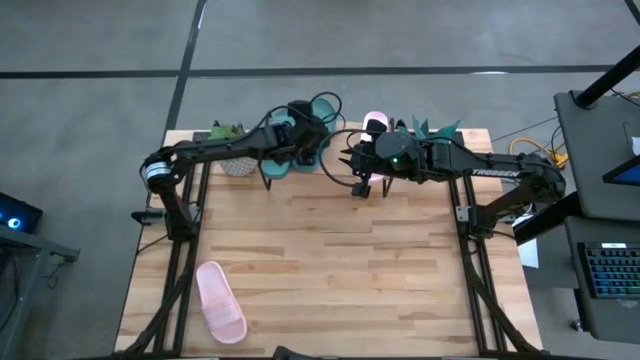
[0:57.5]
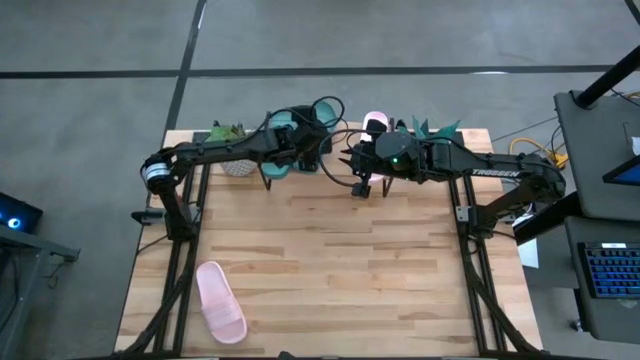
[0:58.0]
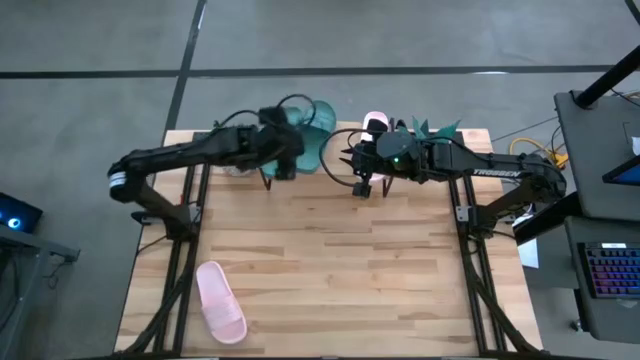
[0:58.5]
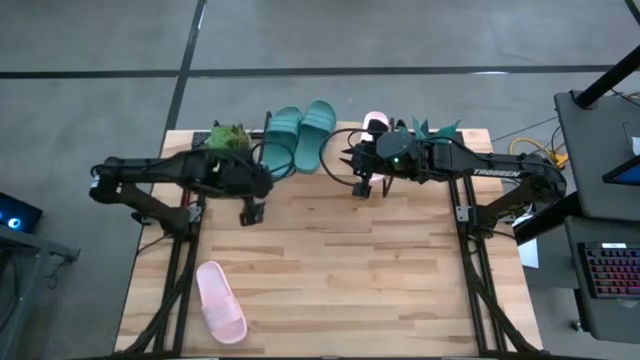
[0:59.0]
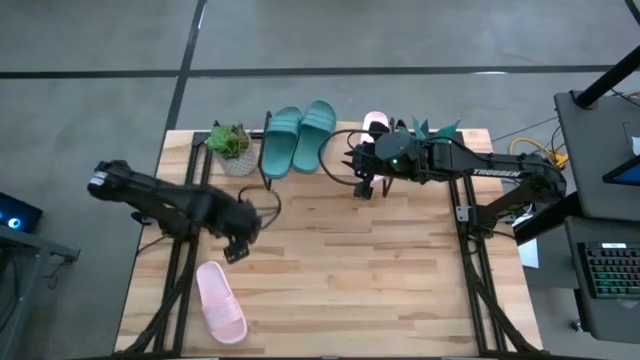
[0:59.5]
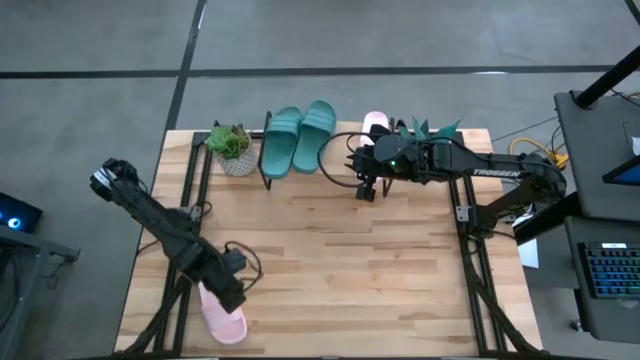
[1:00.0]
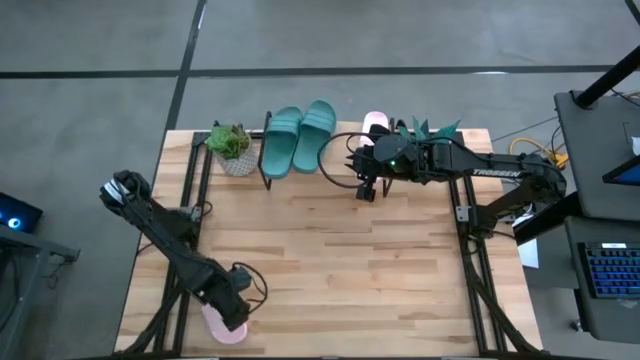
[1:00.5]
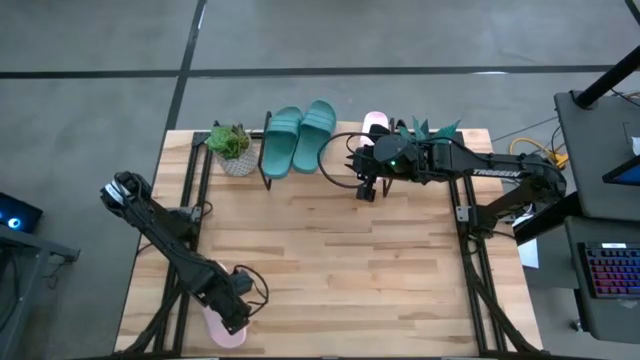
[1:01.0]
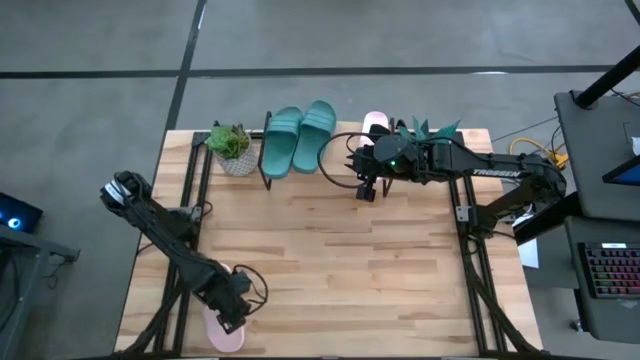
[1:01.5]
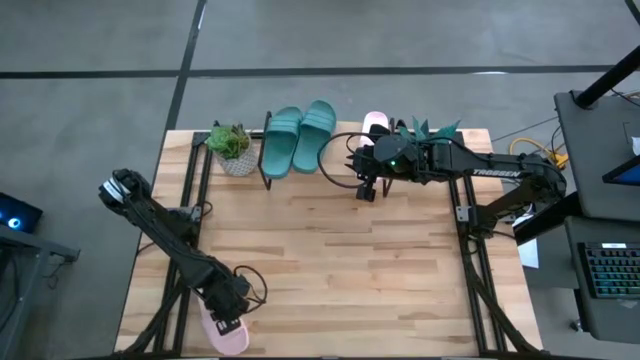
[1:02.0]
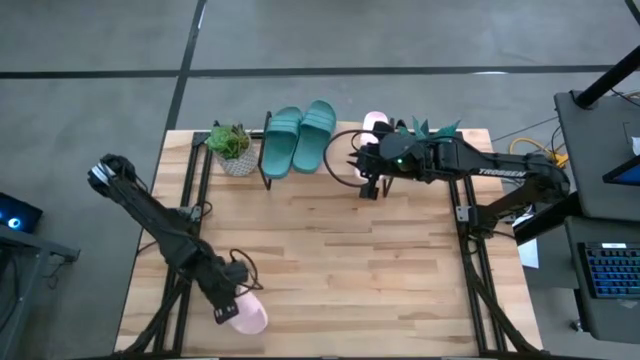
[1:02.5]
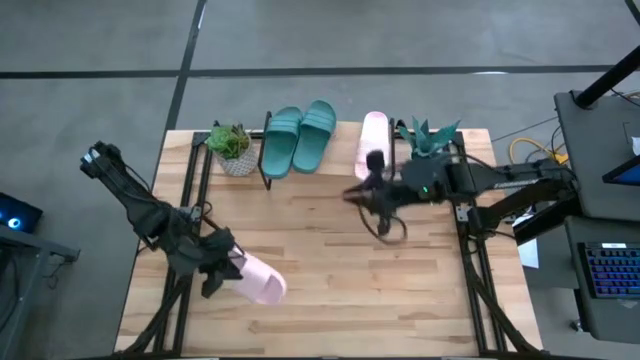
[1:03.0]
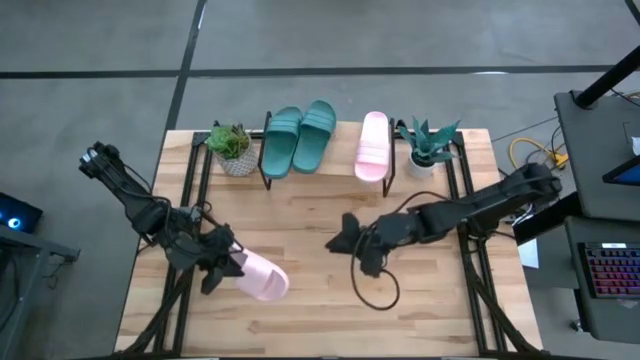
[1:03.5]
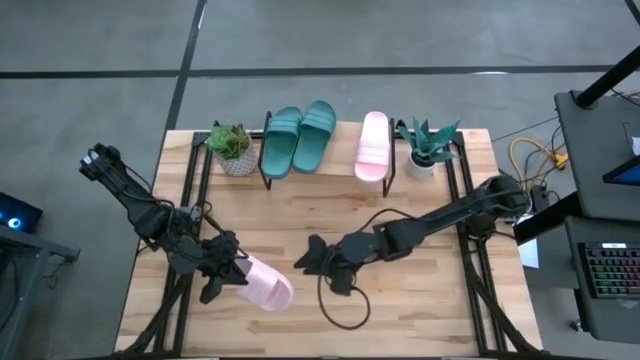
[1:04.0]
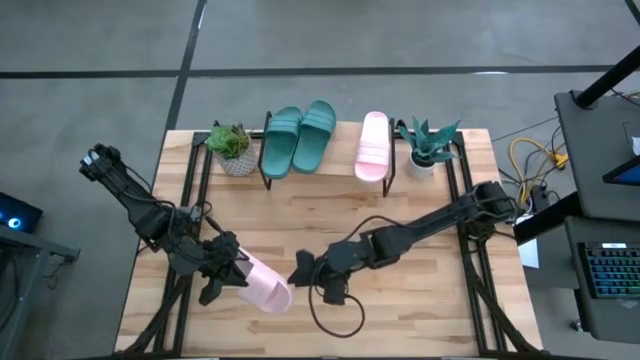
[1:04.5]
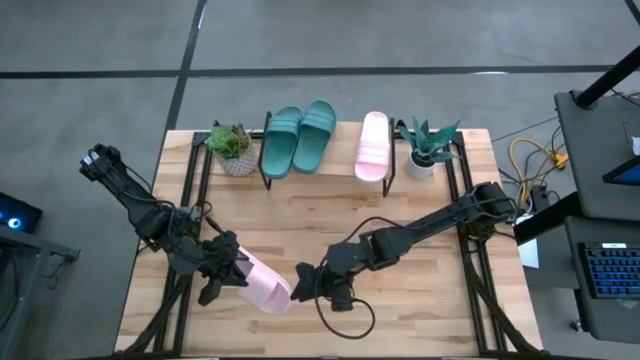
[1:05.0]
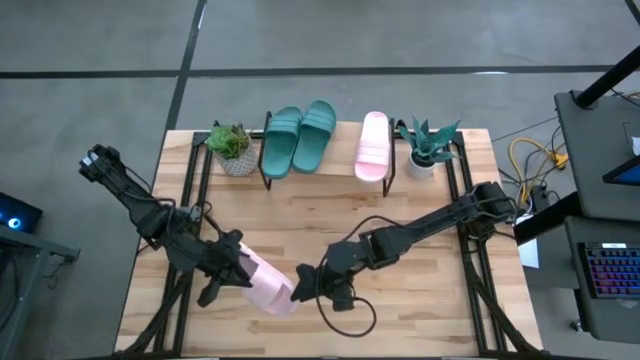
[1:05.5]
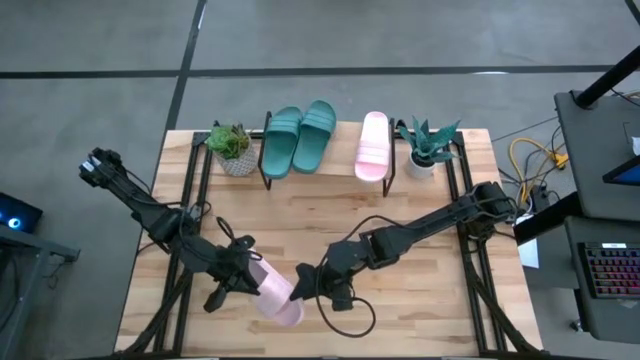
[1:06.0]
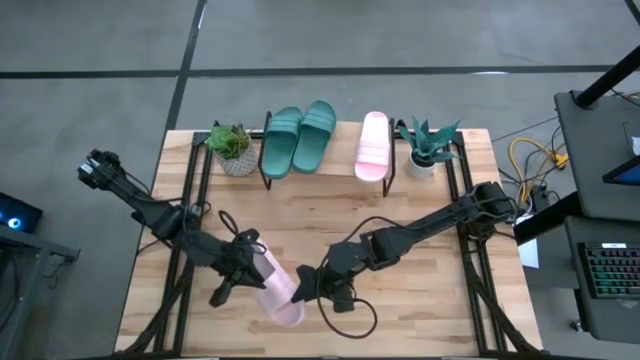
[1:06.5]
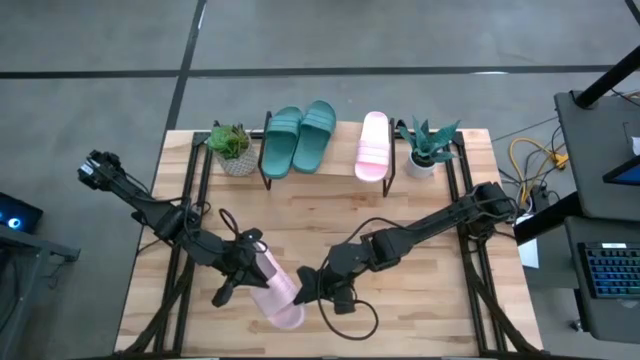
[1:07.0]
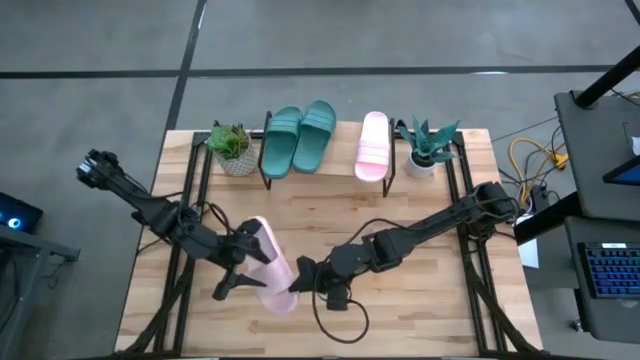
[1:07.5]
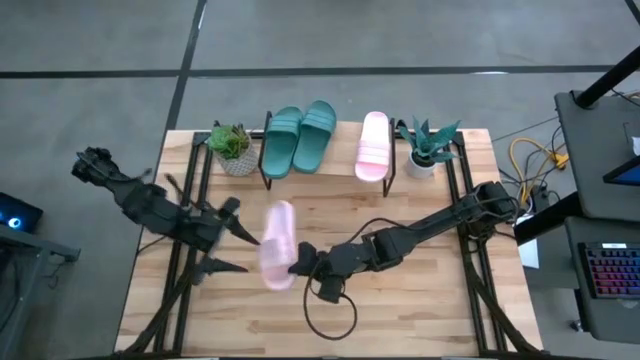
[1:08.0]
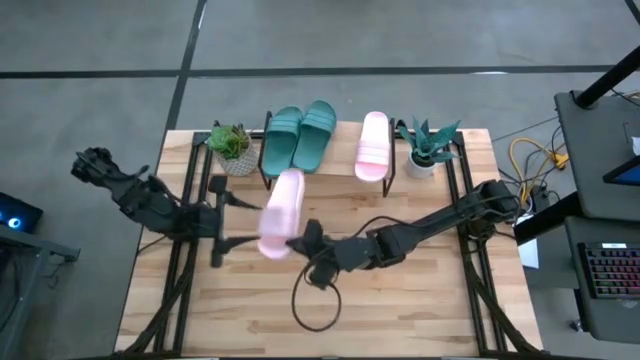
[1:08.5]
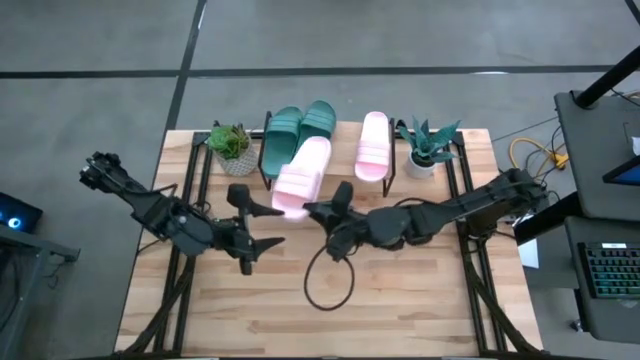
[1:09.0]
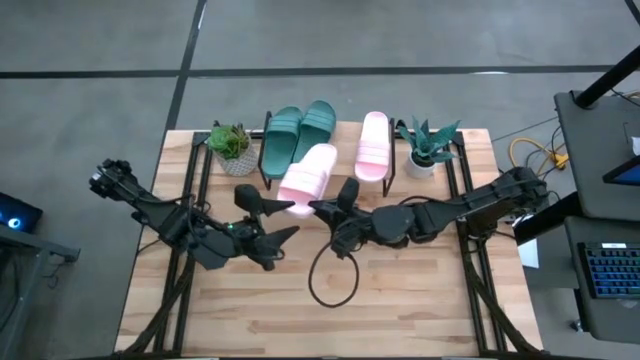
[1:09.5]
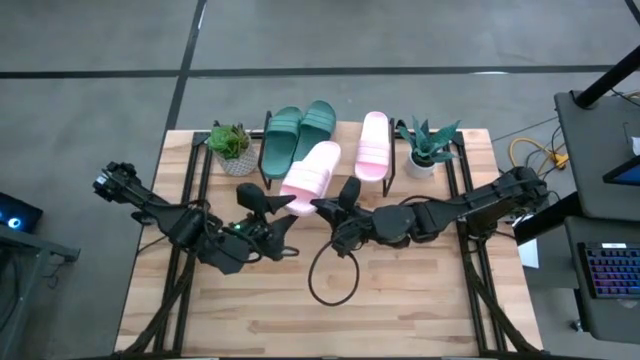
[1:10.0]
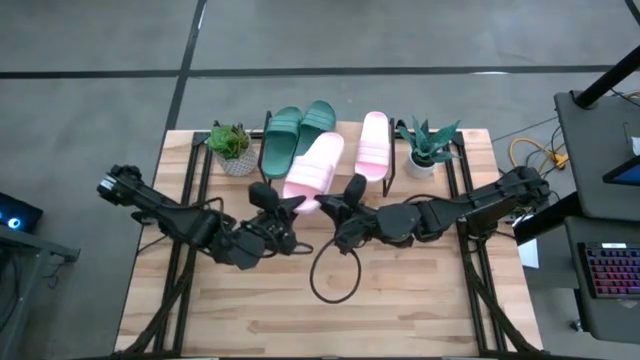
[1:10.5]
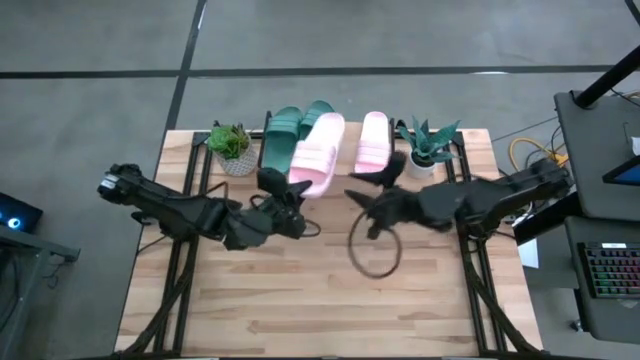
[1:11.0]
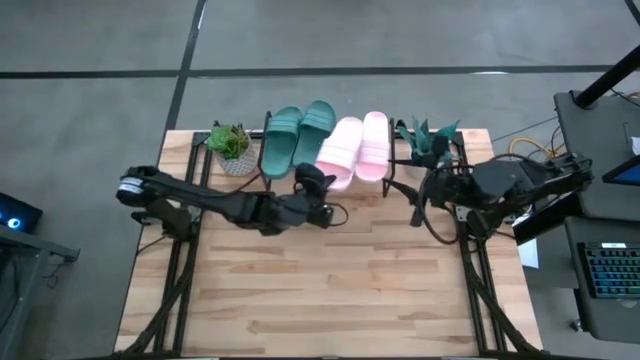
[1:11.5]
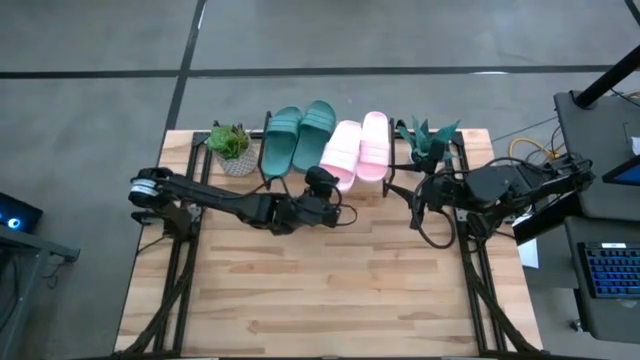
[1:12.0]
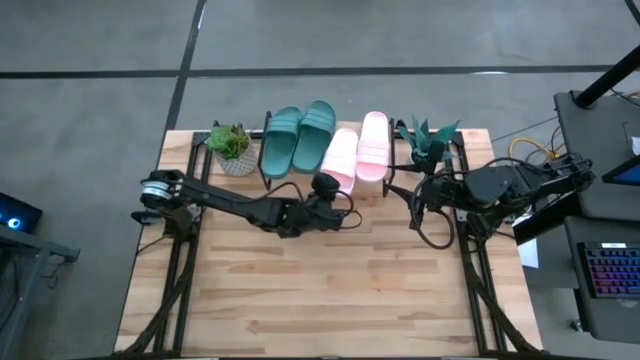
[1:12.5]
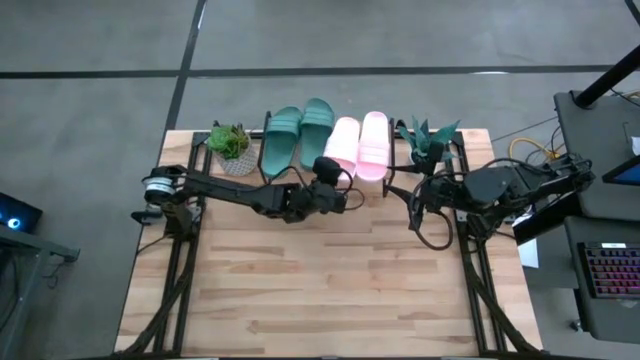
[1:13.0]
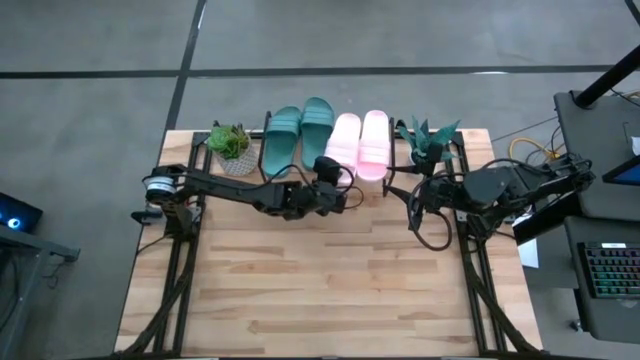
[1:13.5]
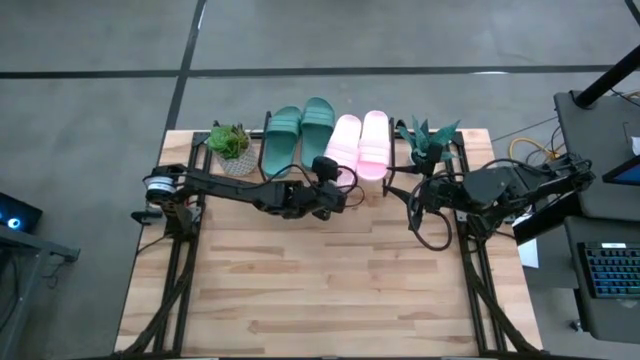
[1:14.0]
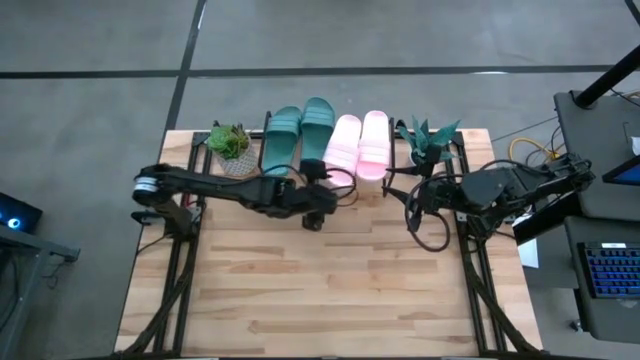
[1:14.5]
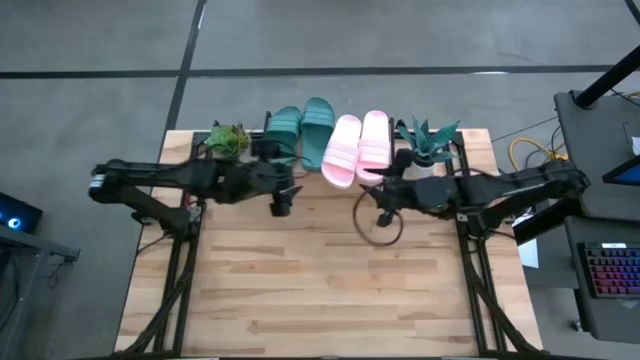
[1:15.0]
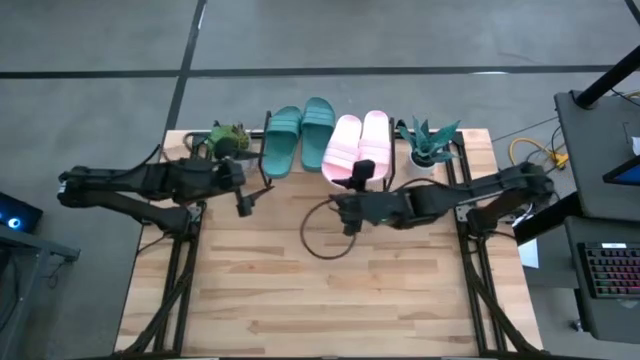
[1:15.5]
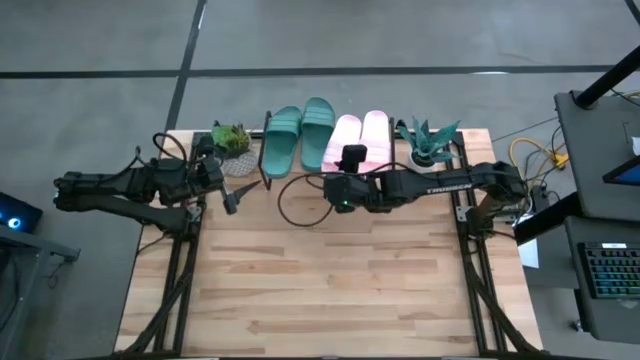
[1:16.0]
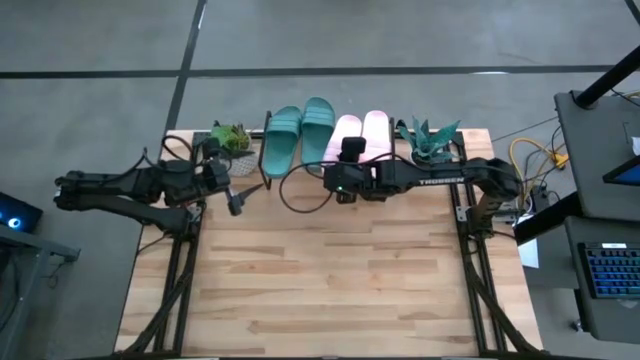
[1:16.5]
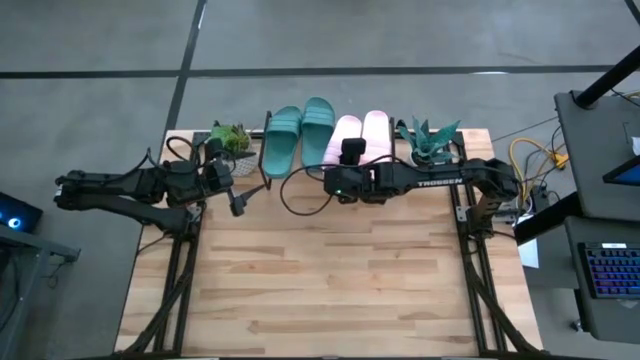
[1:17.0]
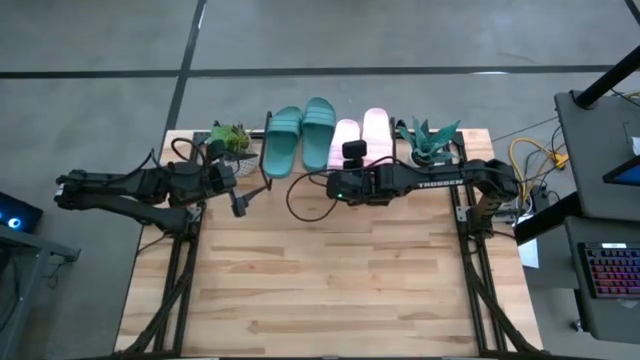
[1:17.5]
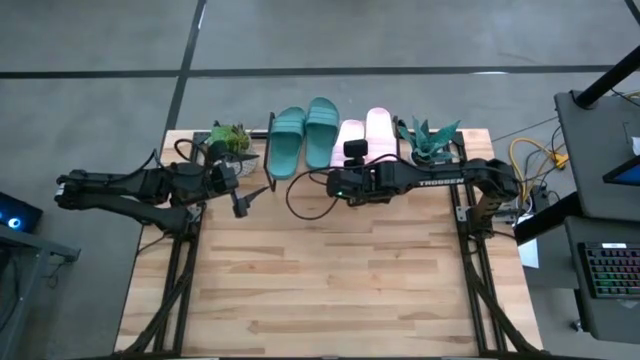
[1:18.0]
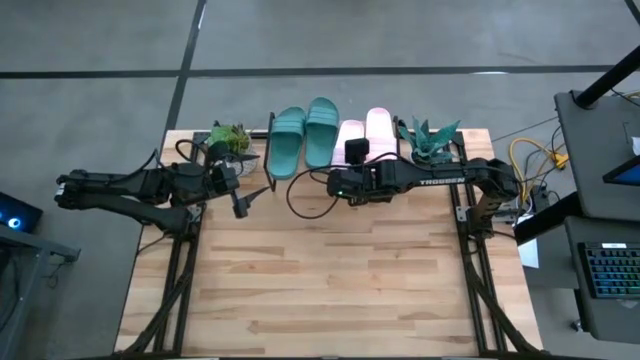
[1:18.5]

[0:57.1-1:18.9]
Task: Pick and place slides into the shelf
Put the pink slide on the shelf
